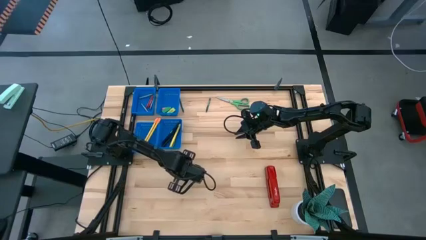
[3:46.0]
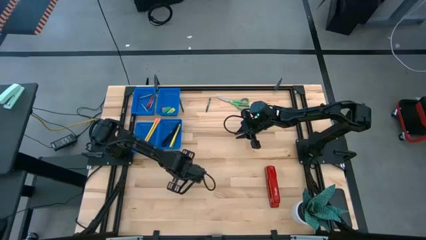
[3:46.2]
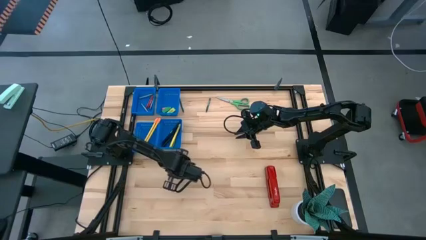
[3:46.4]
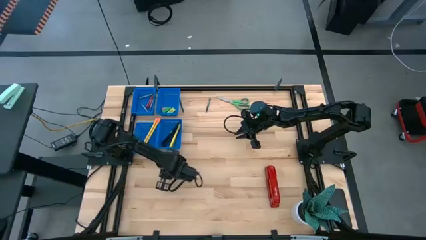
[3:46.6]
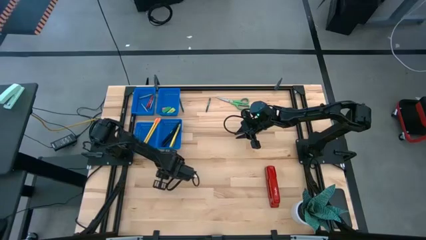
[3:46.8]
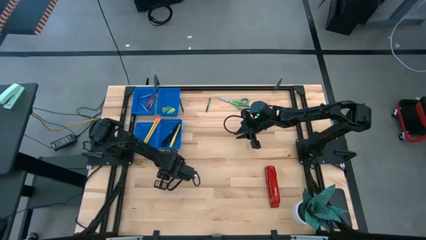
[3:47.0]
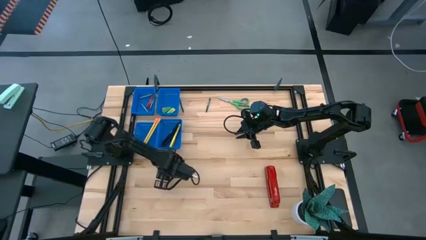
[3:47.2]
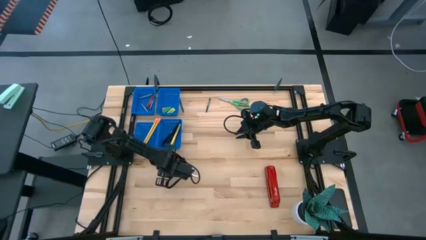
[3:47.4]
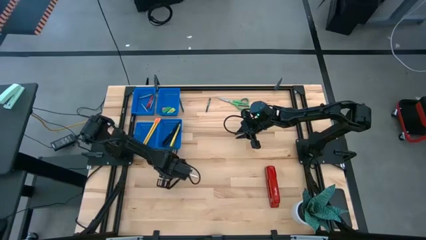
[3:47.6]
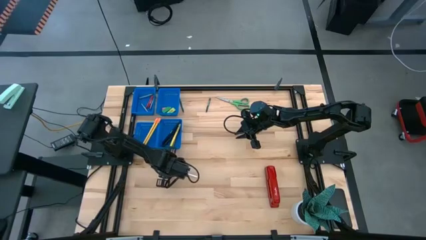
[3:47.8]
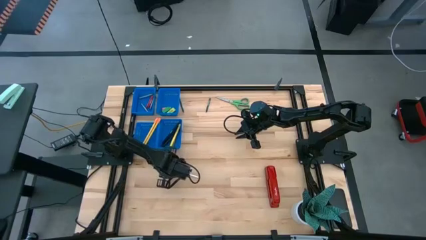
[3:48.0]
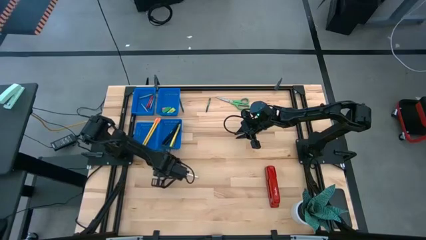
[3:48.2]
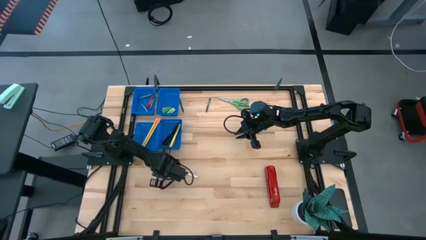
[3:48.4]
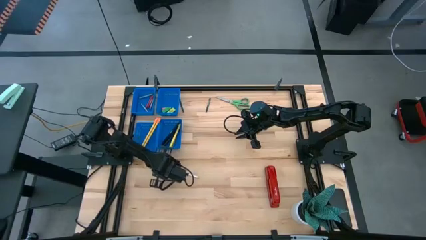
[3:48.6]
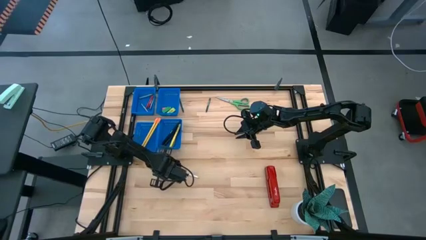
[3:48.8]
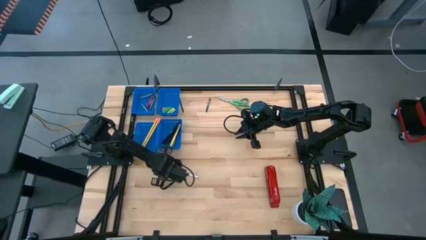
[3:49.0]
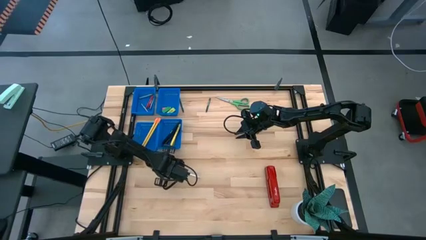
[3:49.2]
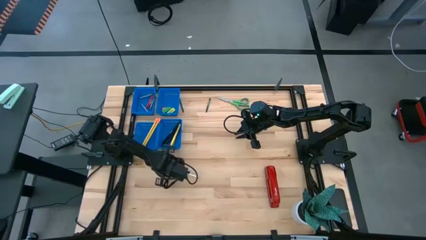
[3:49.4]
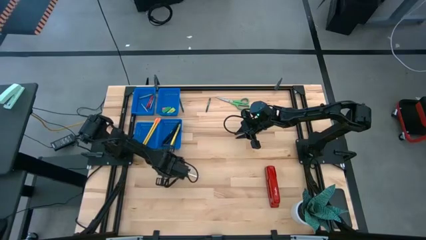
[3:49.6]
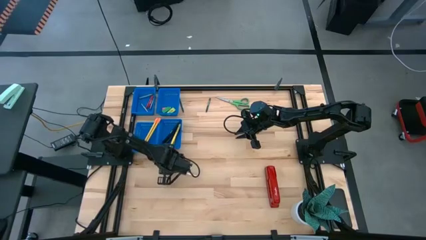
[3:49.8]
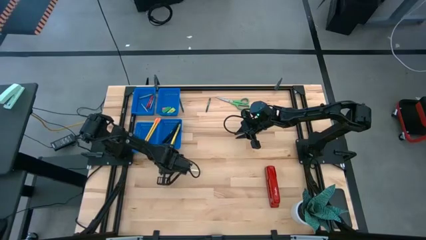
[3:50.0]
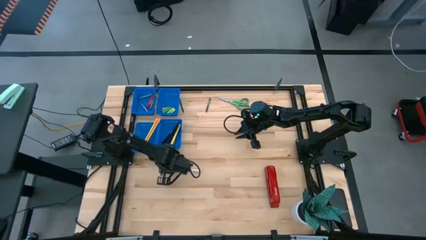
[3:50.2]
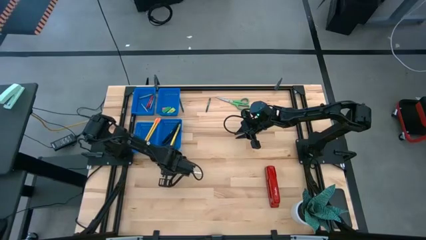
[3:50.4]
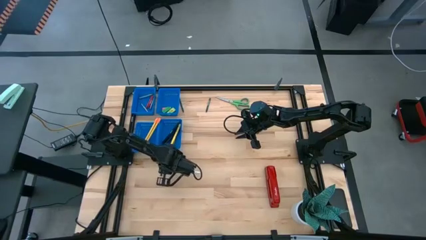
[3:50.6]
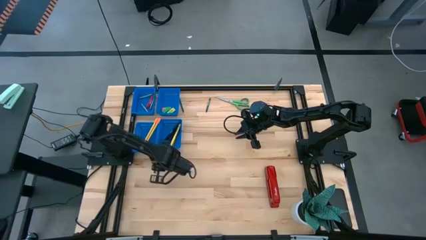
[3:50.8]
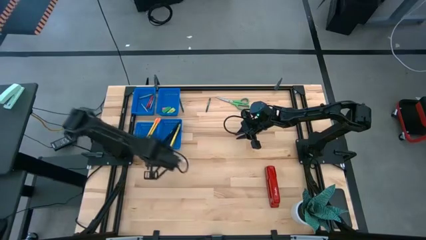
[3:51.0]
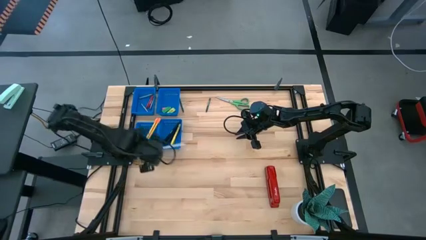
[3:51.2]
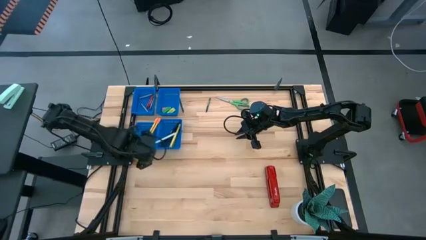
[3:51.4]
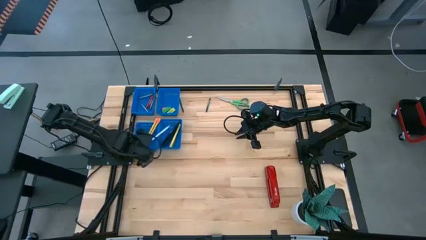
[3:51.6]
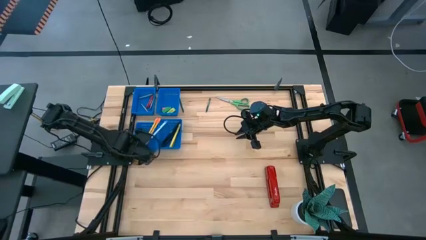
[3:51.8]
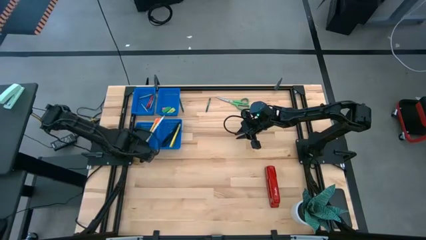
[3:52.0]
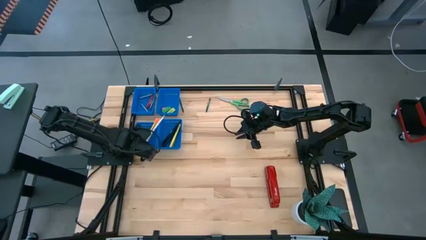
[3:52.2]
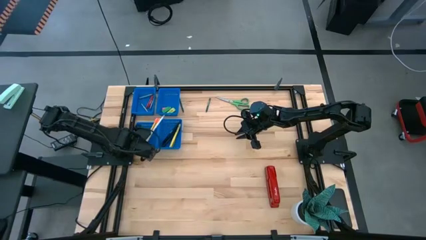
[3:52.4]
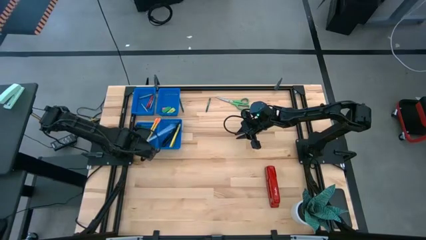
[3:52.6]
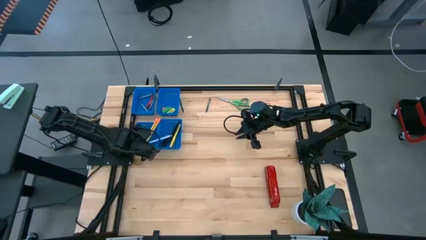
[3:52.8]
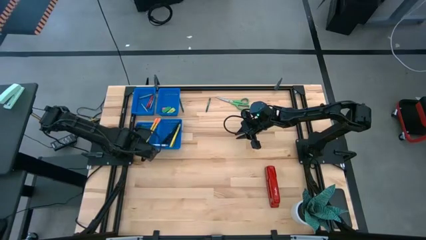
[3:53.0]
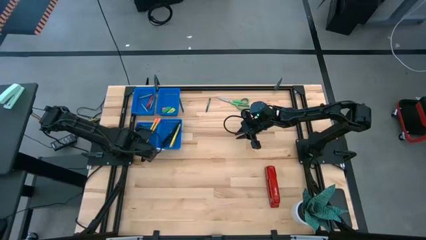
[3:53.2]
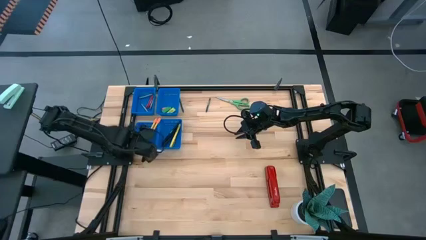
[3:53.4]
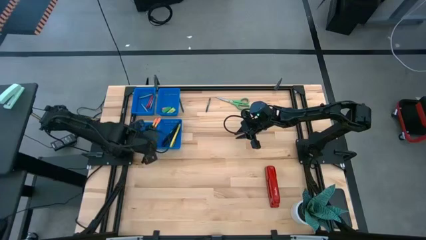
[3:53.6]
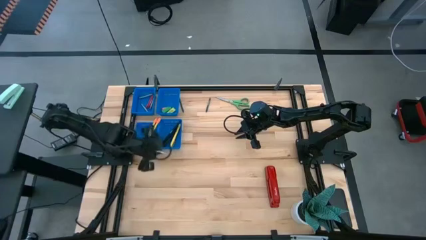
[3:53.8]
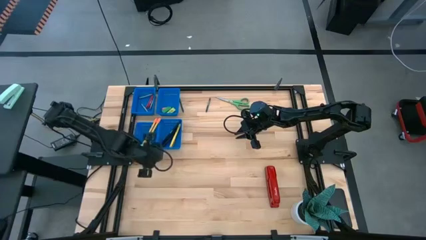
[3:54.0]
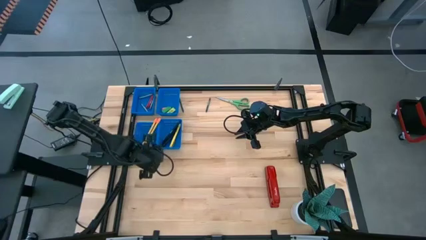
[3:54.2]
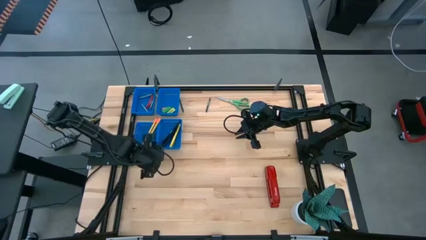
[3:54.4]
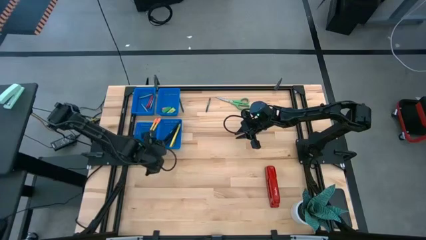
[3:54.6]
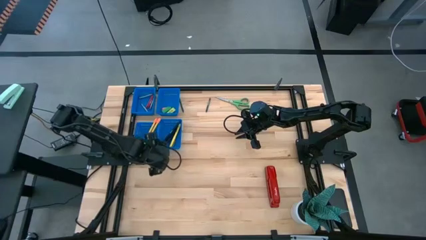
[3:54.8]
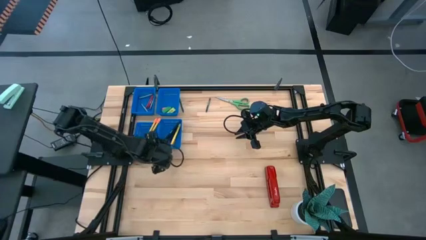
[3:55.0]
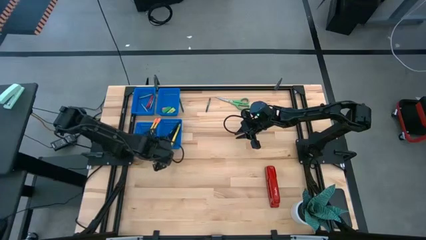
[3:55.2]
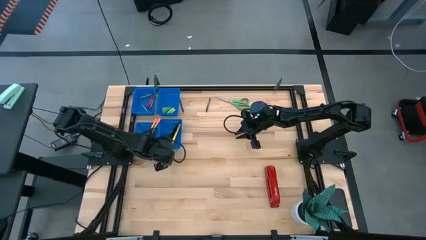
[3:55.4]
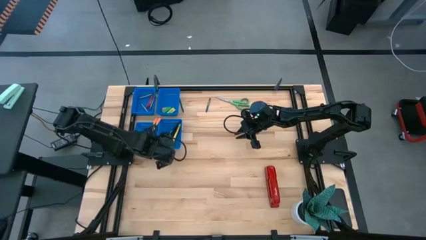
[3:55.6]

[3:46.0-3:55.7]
Task: Sort crayons/erasers/pens/pencils in bins
Put the white pencil into the bottom left blue bin

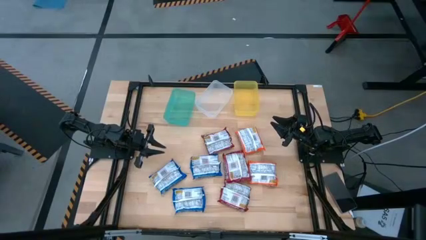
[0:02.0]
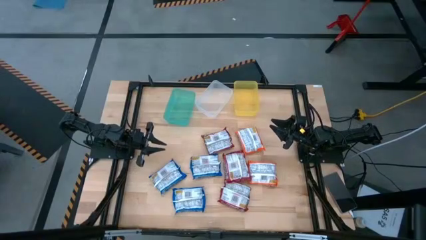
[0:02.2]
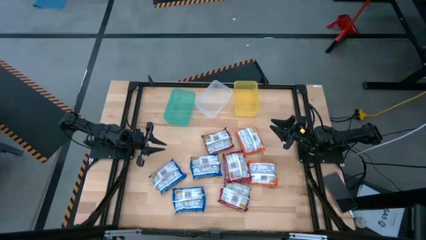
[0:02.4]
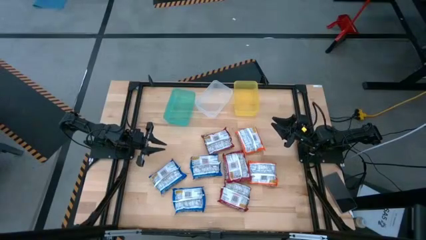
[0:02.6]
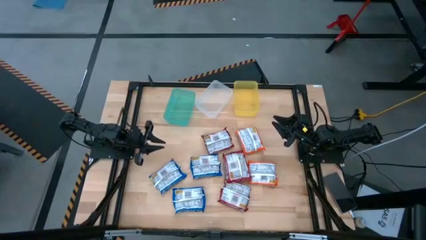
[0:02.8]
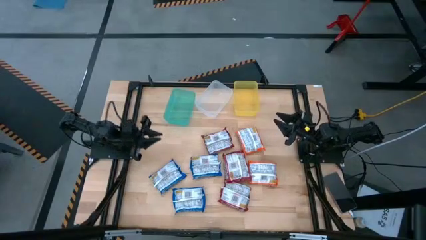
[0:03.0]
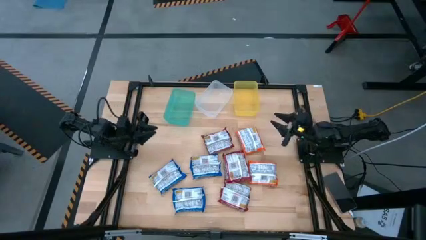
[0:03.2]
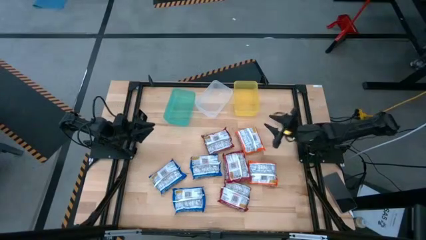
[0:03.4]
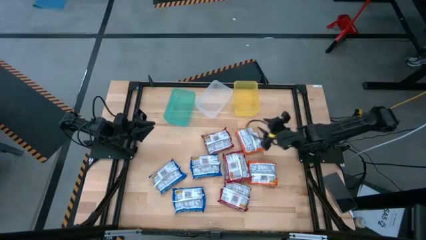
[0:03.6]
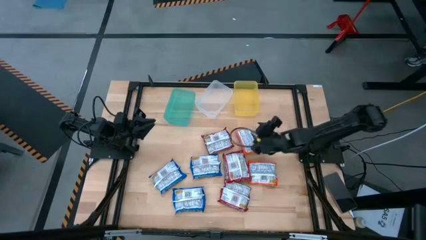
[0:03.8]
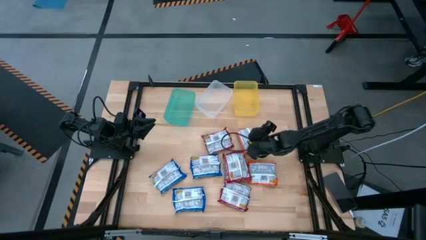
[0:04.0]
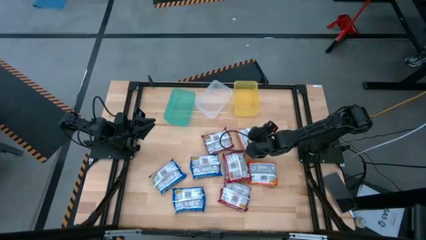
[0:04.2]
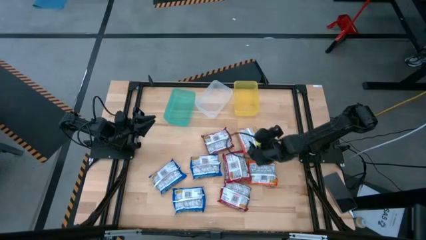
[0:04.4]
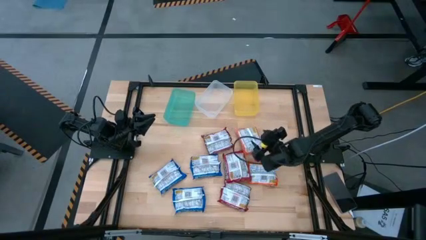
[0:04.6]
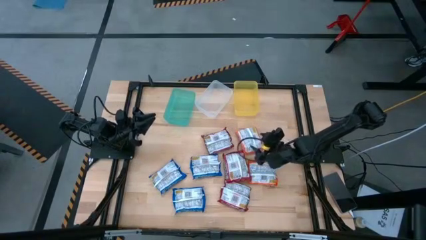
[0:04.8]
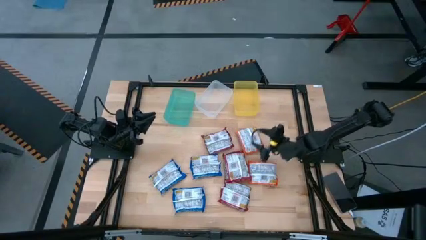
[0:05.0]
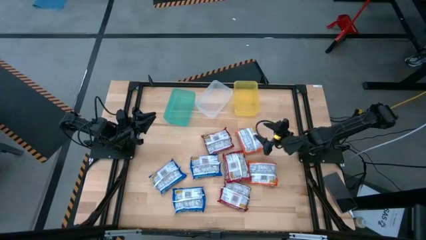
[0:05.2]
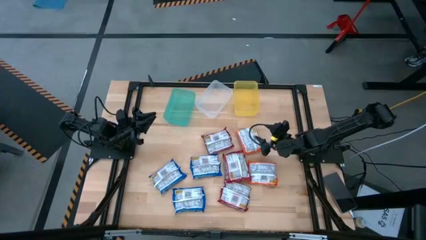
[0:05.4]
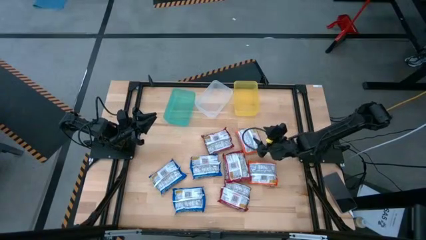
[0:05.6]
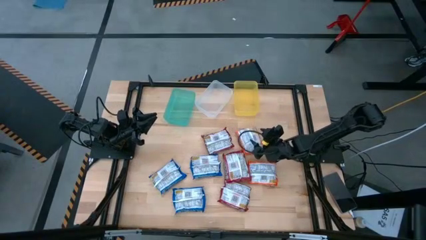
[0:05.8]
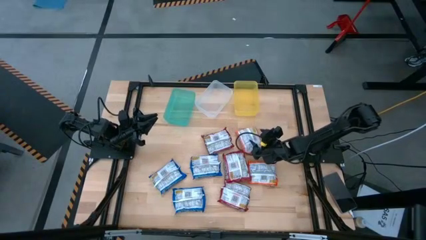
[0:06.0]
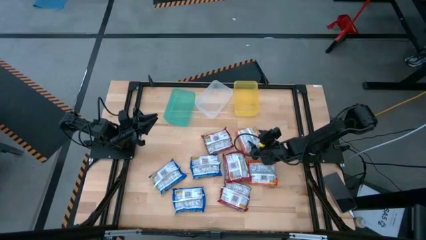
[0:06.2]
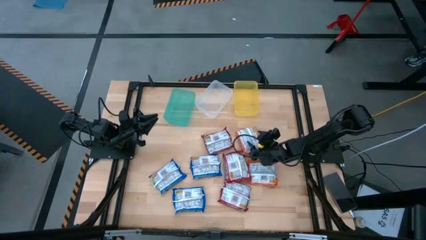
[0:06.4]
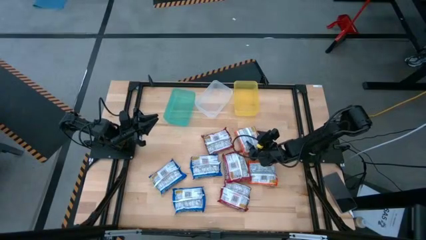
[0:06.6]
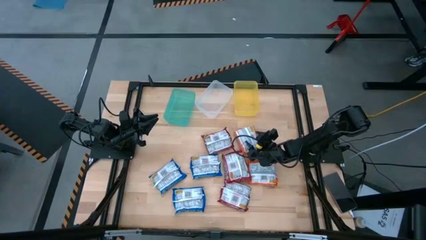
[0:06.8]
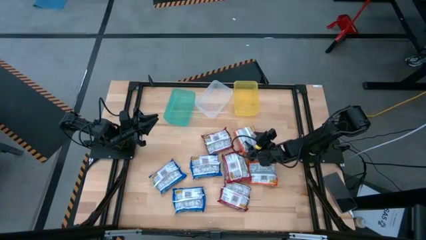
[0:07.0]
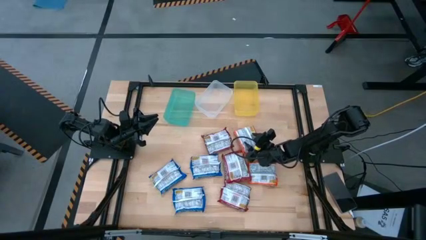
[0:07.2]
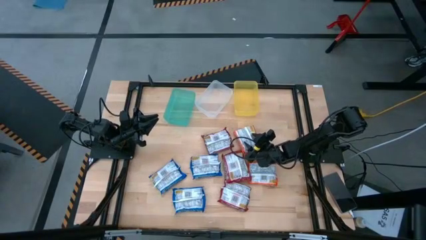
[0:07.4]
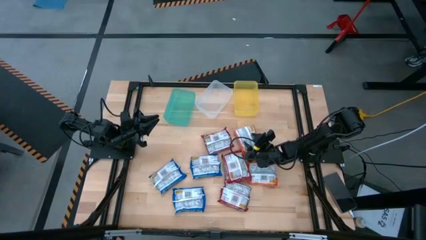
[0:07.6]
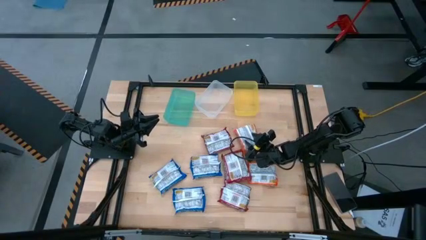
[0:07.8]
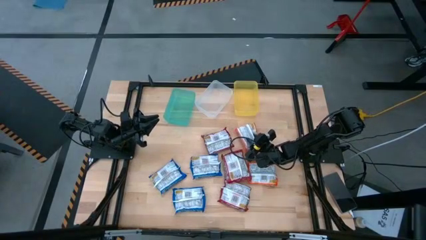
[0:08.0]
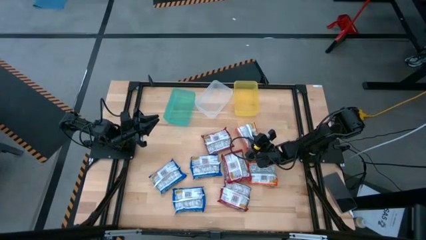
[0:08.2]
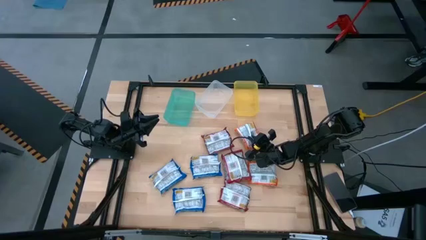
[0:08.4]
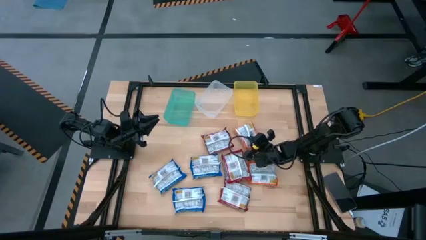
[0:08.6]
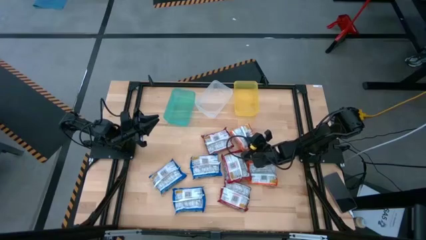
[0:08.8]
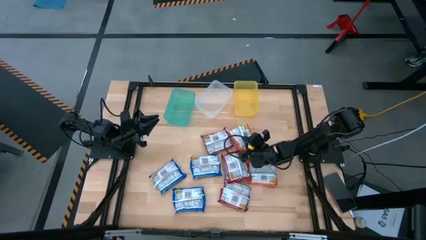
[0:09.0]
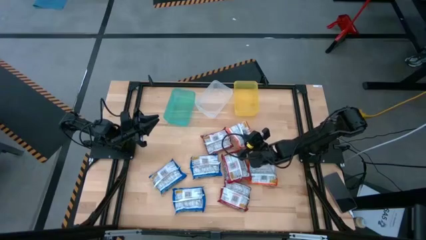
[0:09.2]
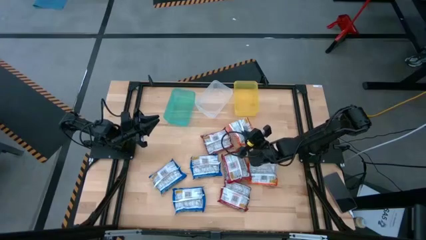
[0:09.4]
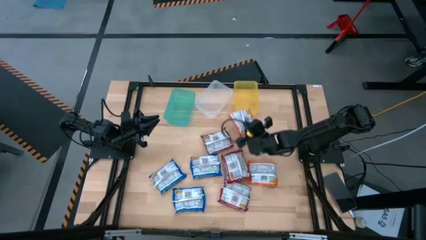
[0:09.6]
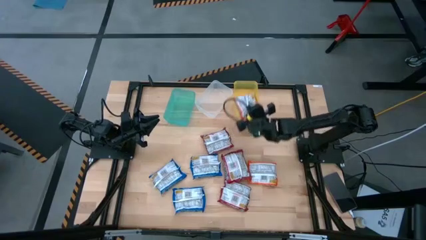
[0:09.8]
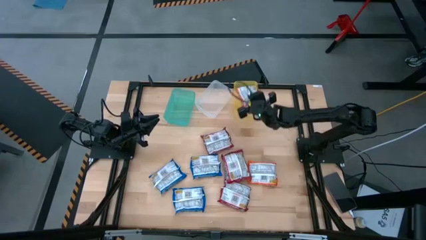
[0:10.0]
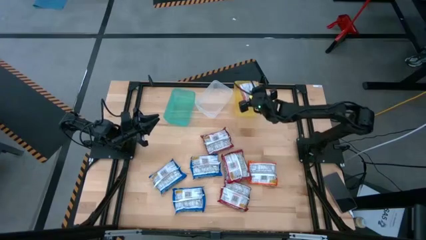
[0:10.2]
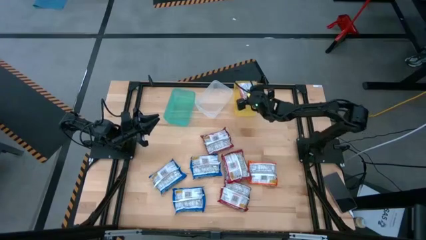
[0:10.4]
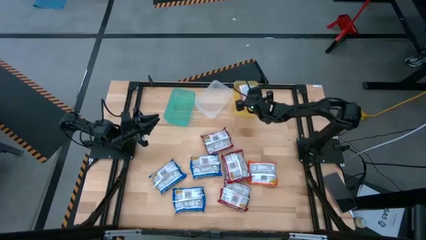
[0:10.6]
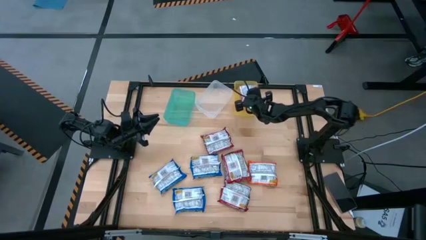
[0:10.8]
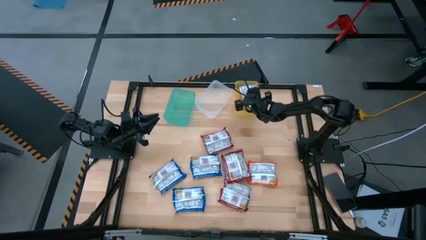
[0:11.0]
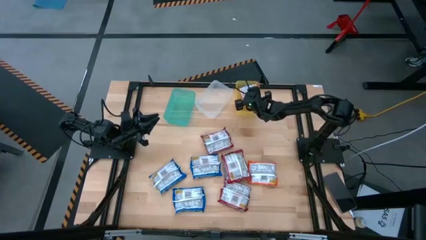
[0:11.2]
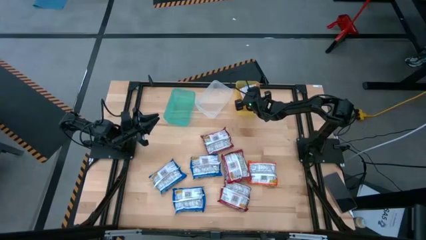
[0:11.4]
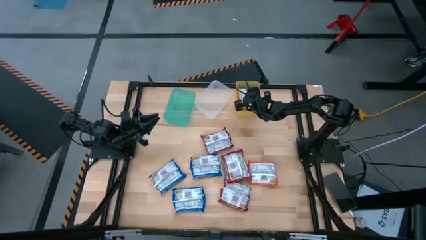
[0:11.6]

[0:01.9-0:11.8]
Task: Sort Maruchan noodles
Put the top orange noodle pack into the yellow bin
